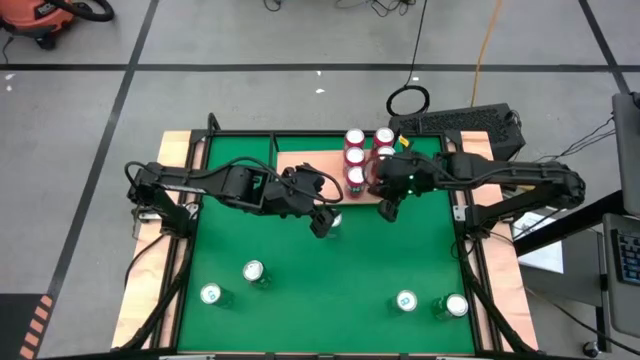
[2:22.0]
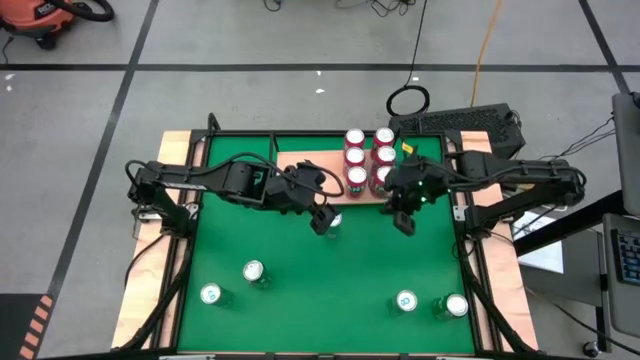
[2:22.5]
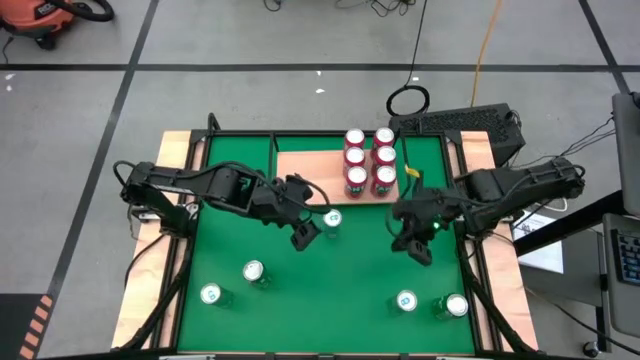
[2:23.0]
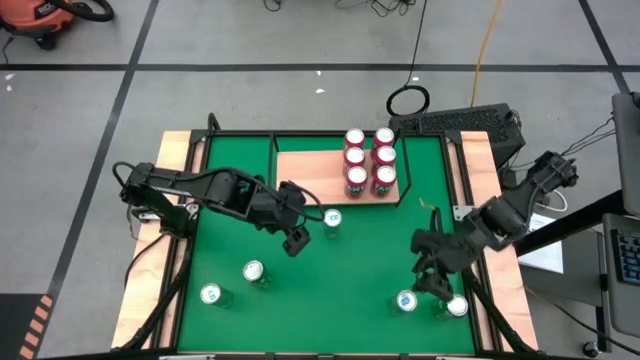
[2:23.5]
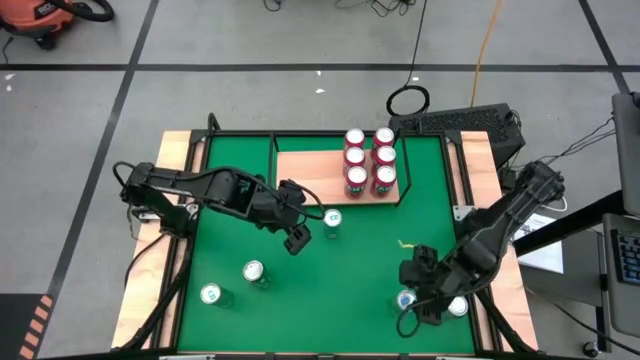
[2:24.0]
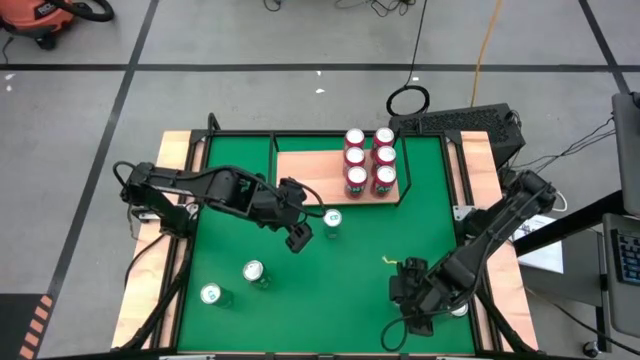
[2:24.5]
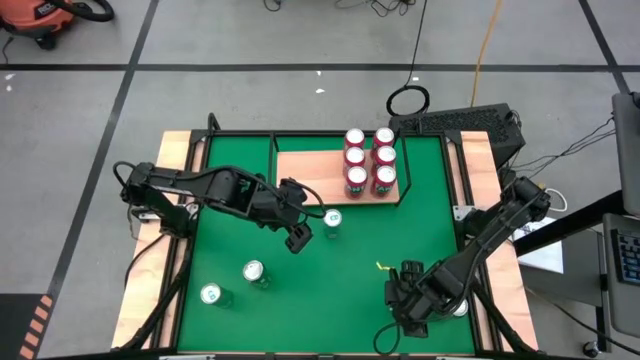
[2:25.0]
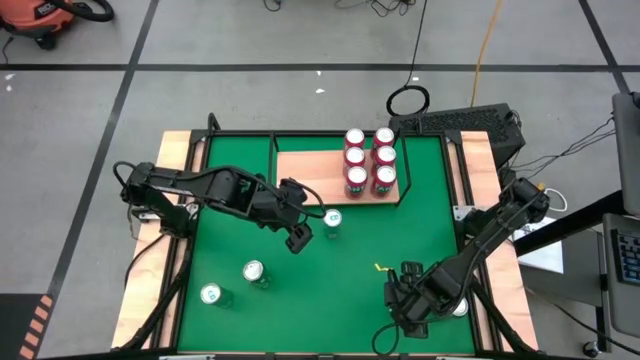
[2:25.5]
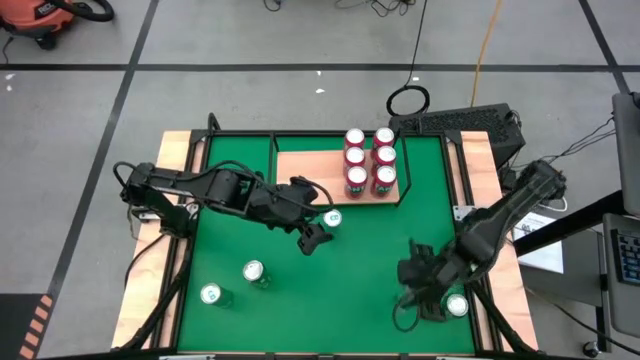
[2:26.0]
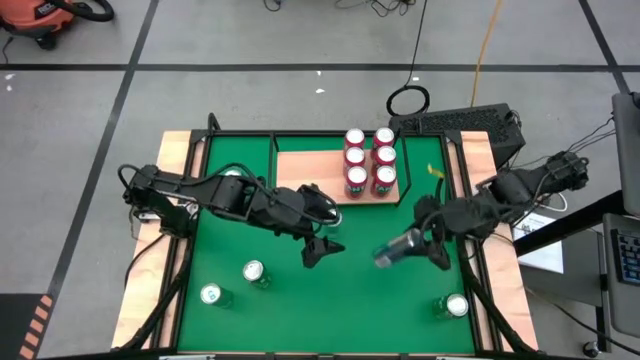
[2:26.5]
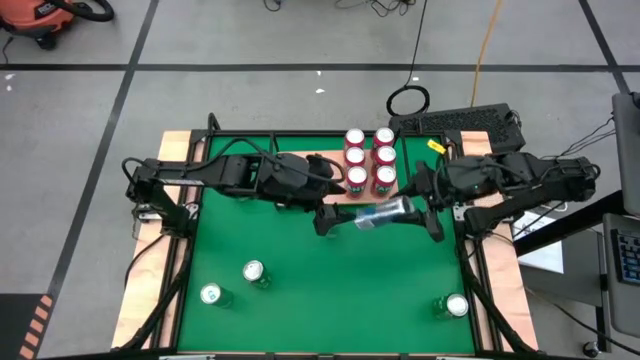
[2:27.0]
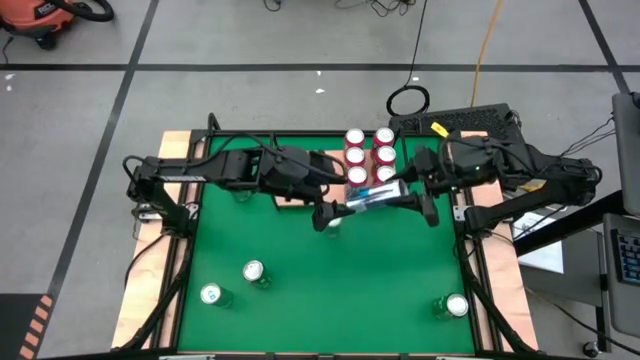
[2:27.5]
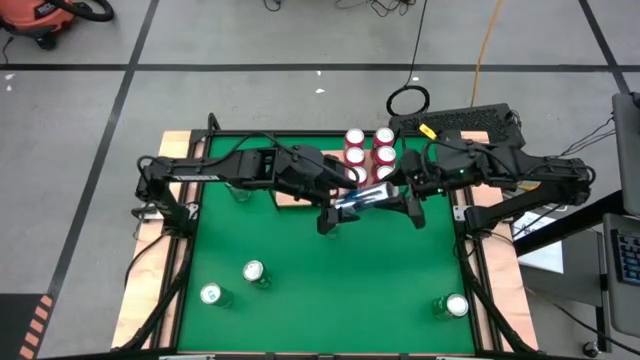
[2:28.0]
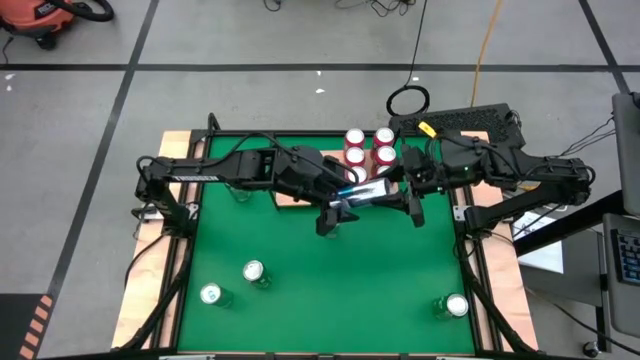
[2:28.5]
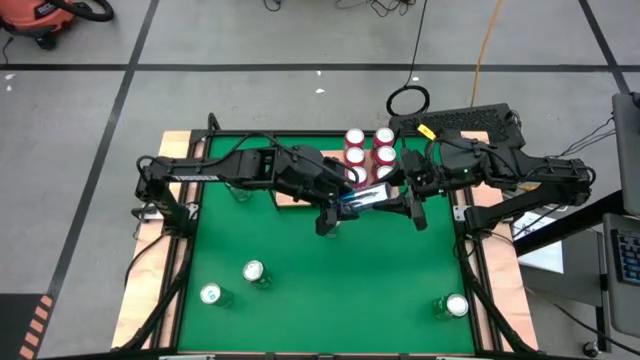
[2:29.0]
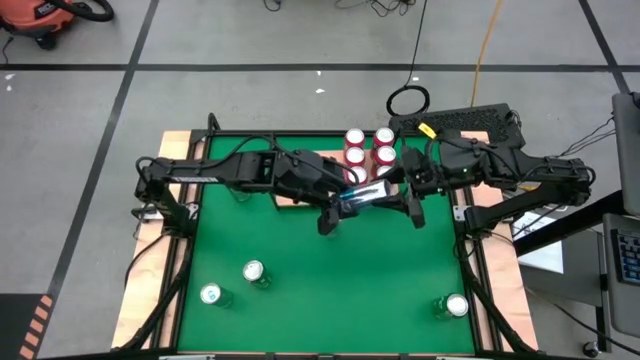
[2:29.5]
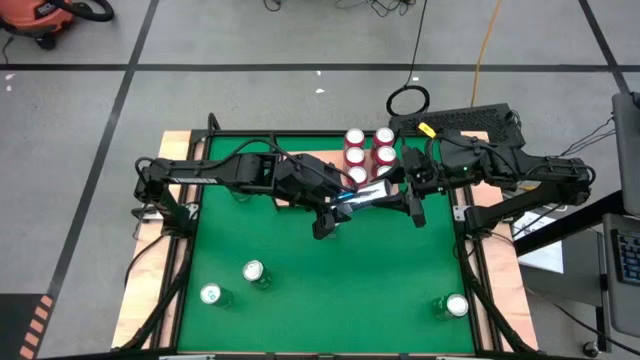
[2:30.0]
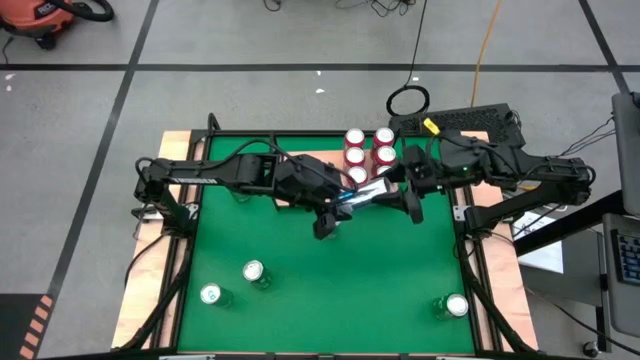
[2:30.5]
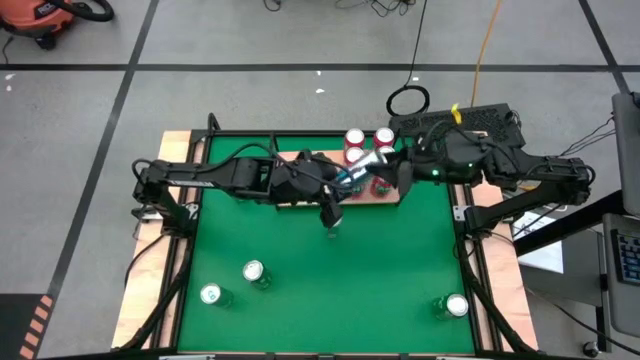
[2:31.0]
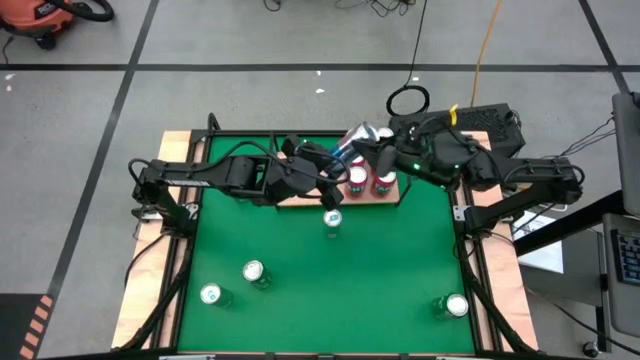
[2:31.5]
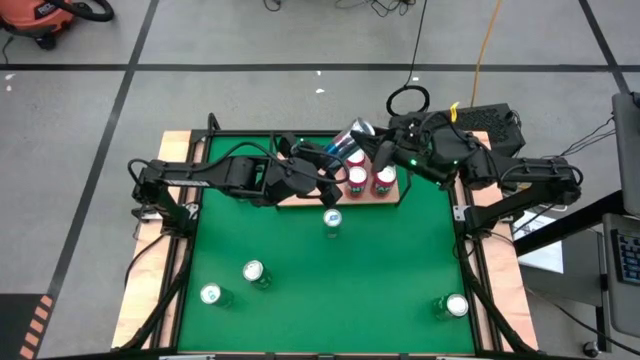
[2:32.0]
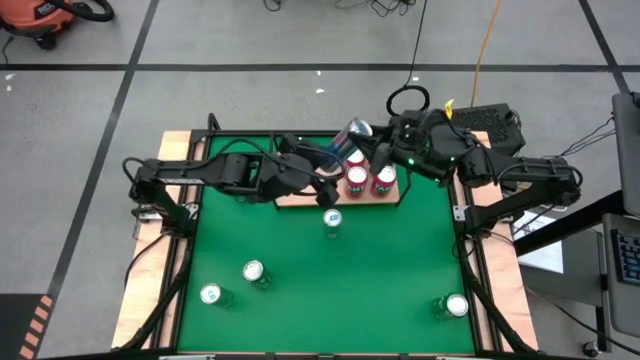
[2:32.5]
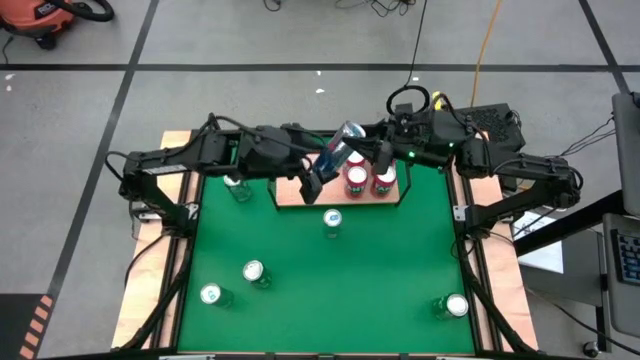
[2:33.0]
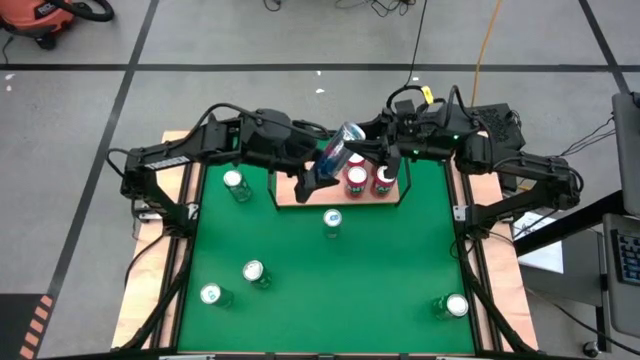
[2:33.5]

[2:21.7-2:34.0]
Task: Place canned beverage on shelf
Put the blue soda can on the shelf

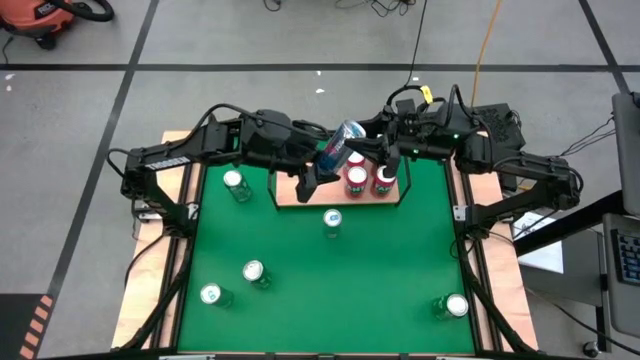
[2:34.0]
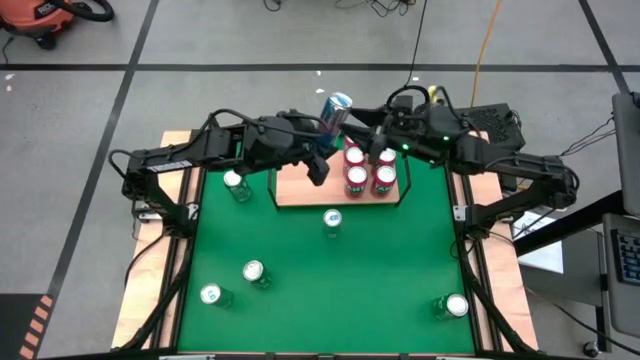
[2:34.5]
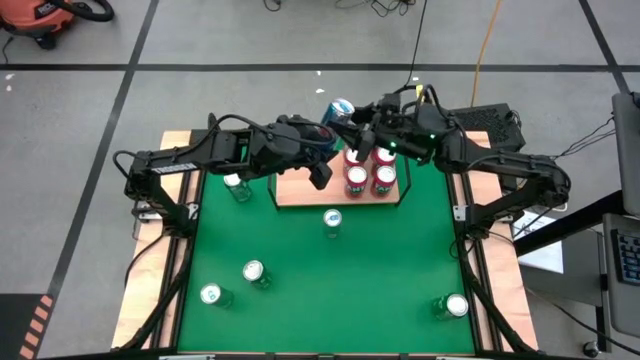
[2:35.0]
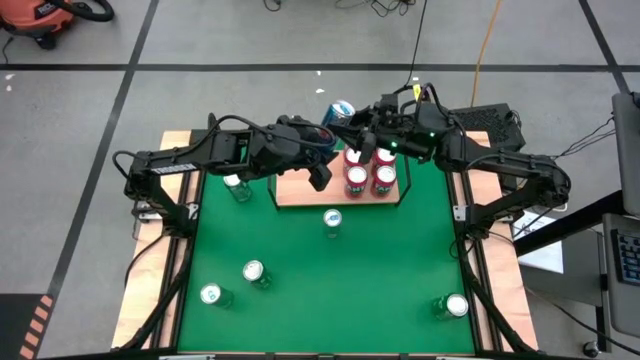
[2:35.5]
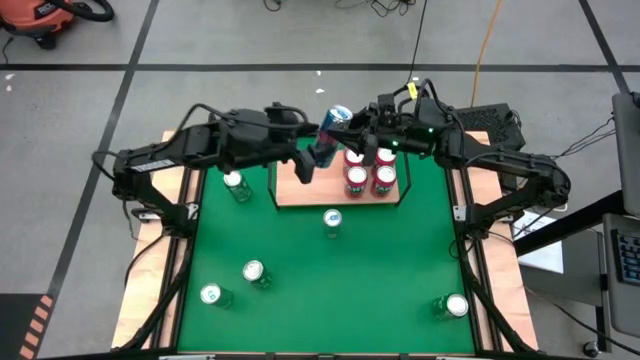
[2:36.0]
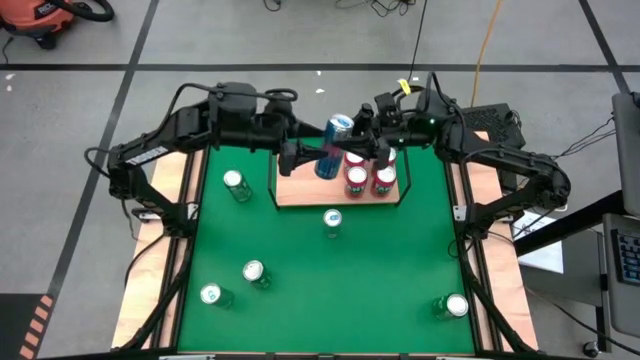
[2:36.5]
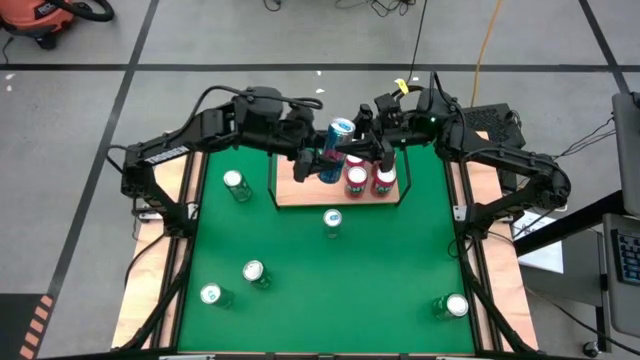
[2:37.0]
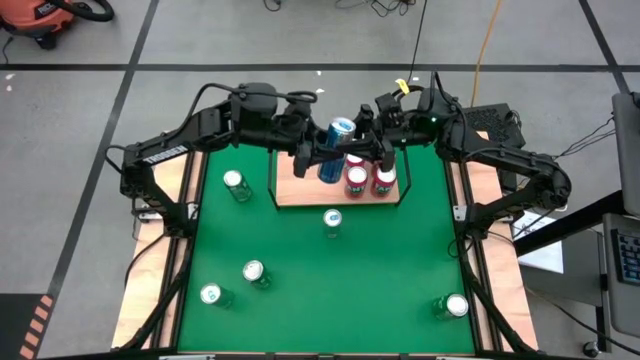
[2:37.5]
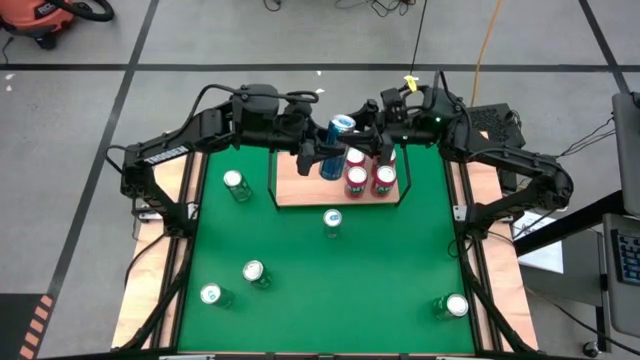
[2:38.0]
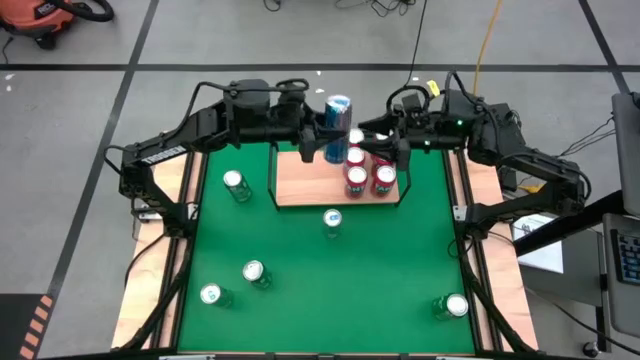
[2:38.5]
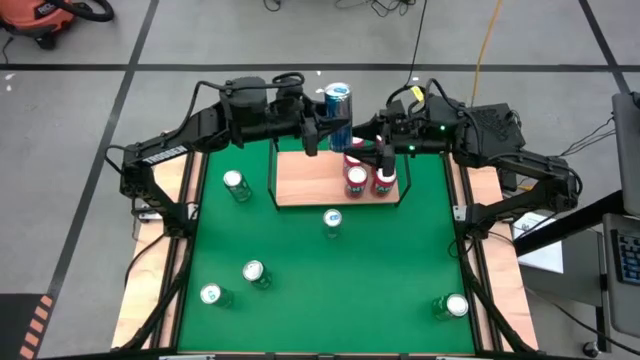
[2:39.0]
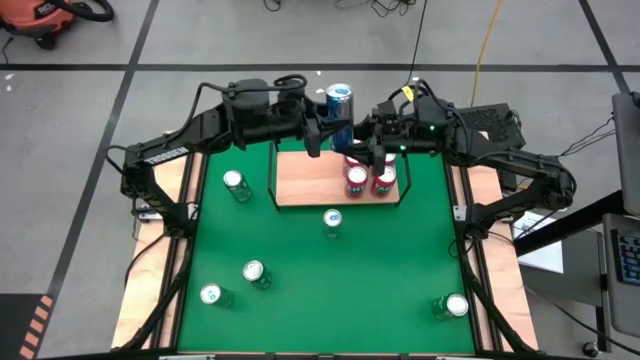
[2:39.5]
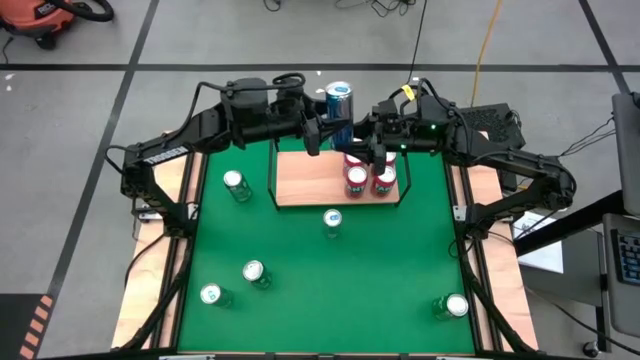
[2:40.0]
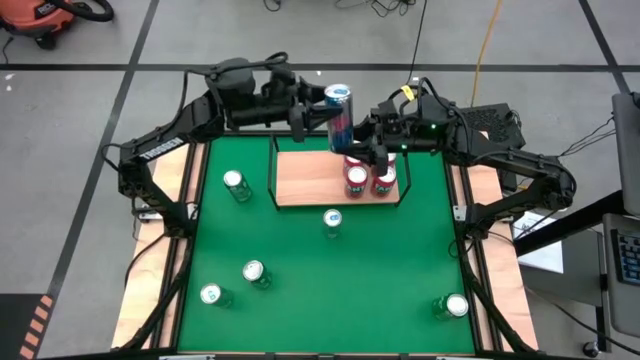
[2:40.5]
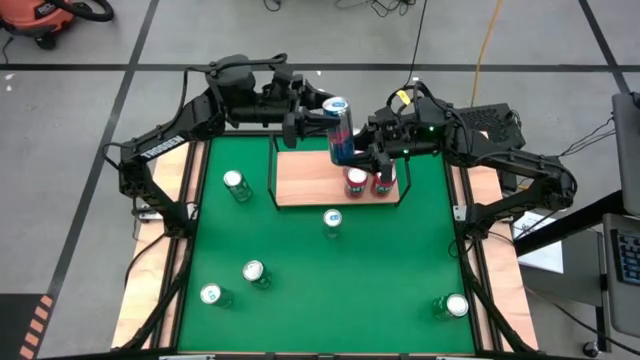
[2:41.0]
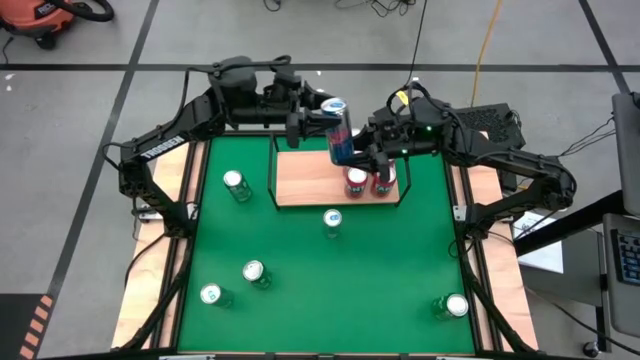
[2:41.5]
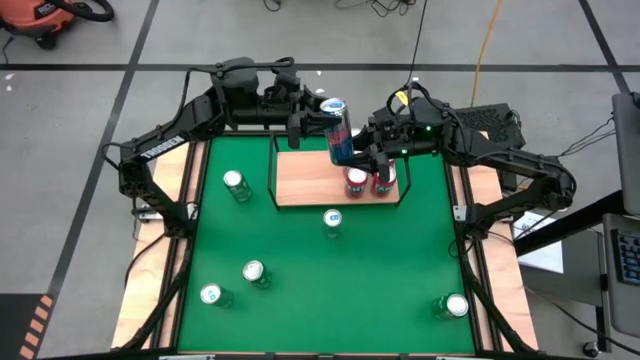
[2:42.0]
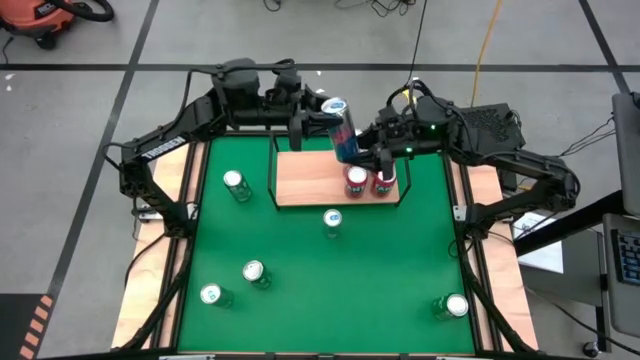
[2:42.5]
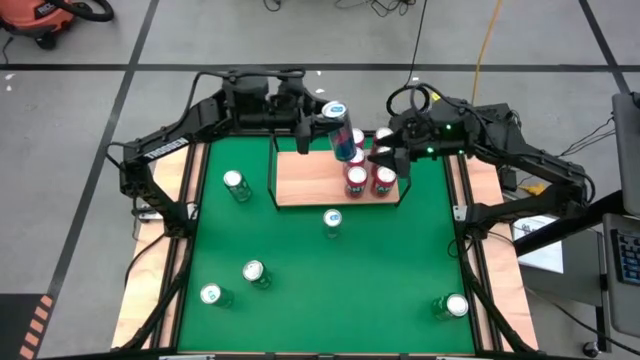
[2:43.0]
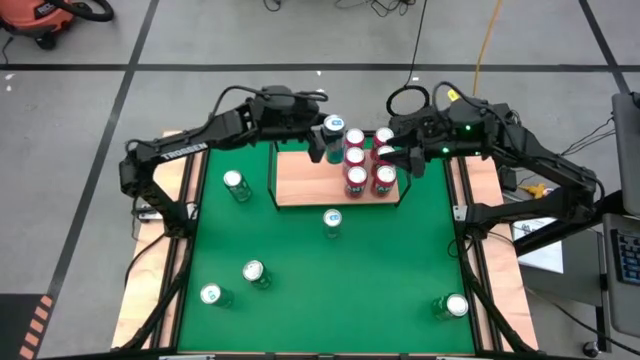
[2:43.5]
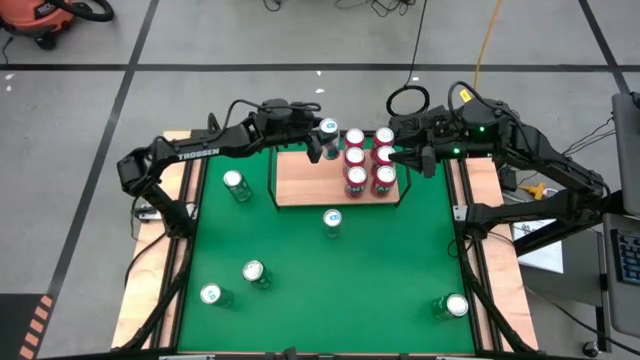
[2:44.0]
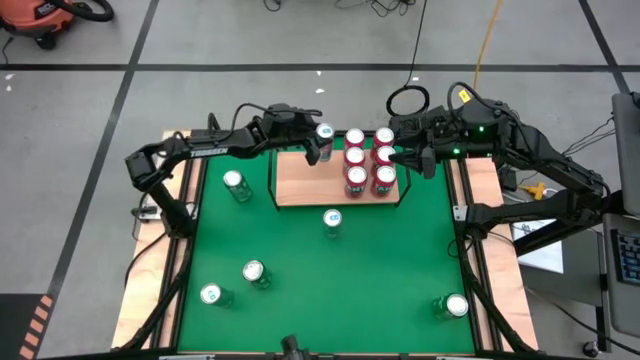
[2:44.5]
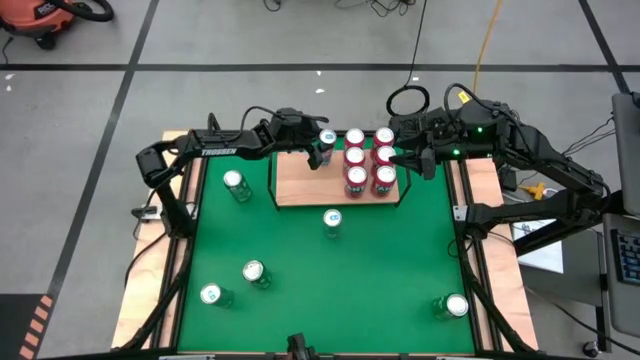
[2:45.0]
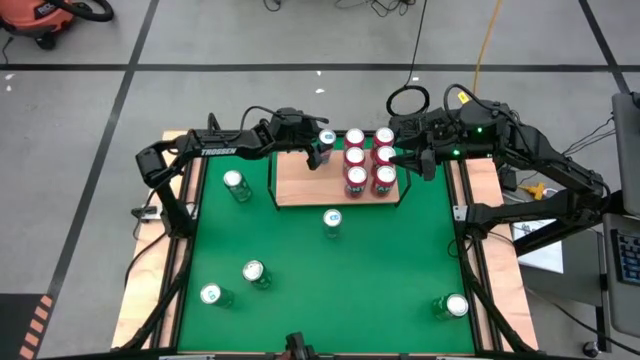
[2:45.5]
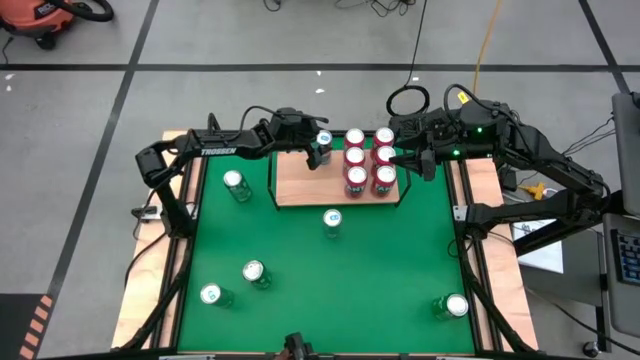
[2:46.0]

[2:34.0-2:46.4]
Put the blue soda can on the shelf
